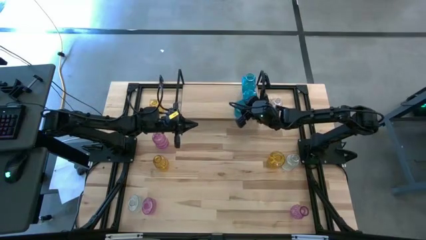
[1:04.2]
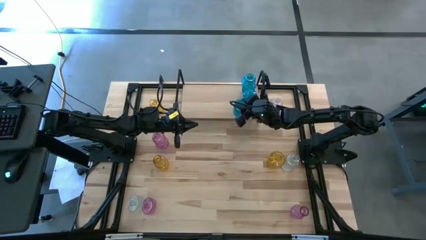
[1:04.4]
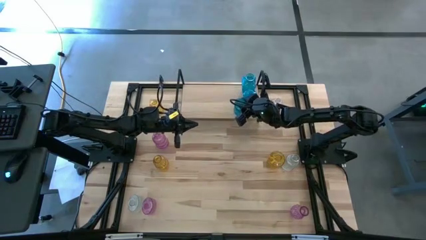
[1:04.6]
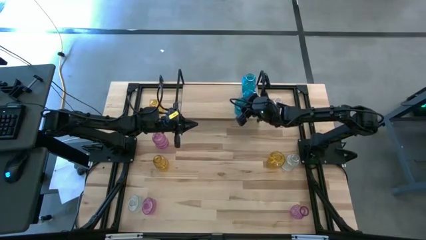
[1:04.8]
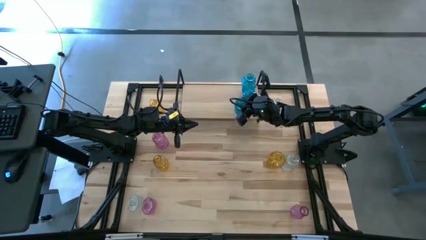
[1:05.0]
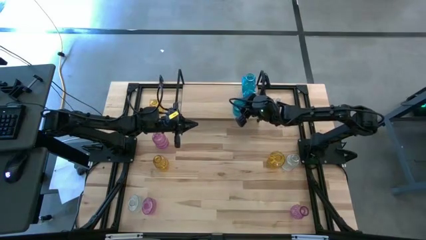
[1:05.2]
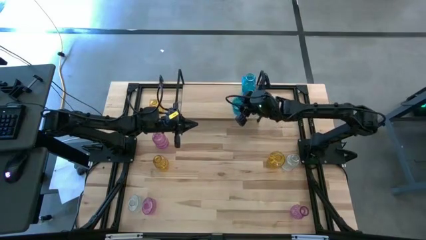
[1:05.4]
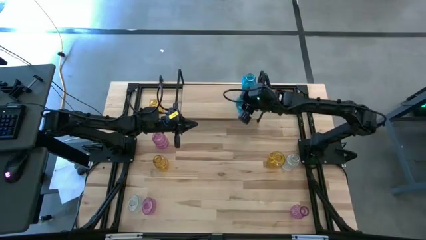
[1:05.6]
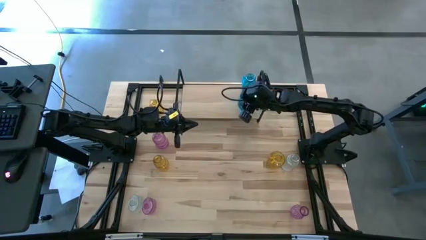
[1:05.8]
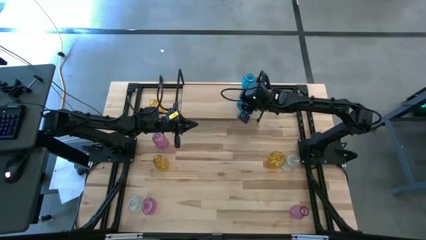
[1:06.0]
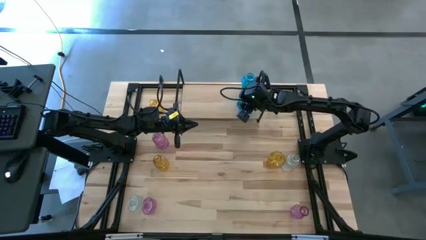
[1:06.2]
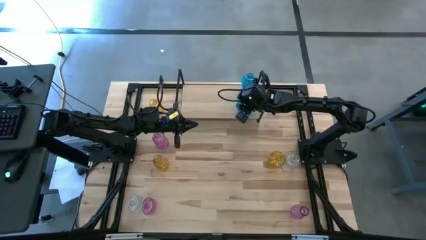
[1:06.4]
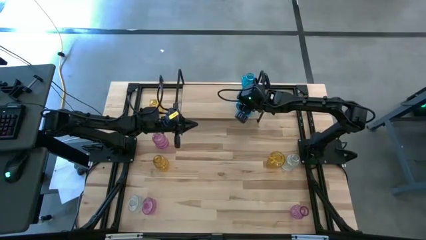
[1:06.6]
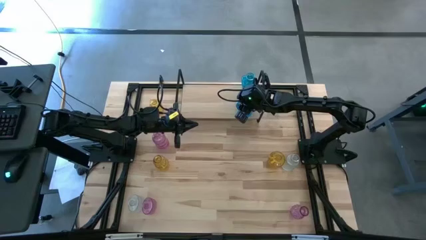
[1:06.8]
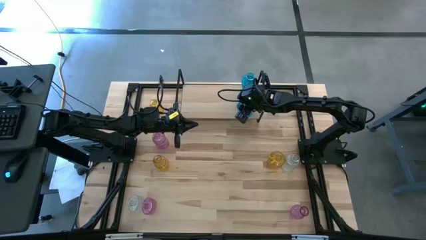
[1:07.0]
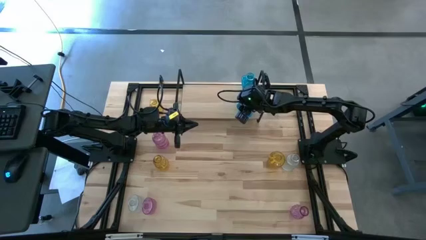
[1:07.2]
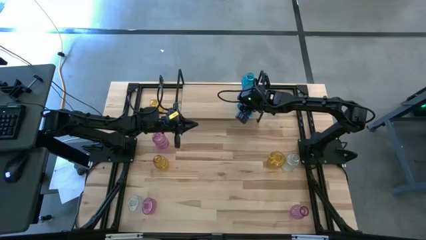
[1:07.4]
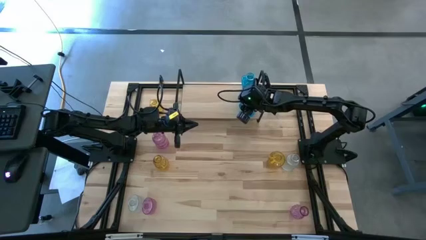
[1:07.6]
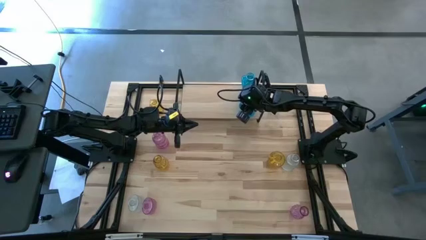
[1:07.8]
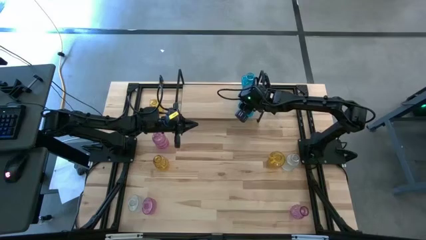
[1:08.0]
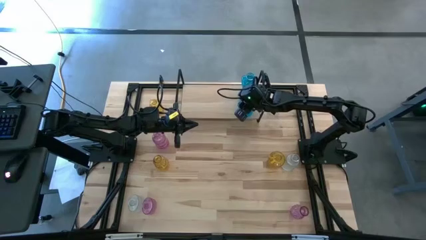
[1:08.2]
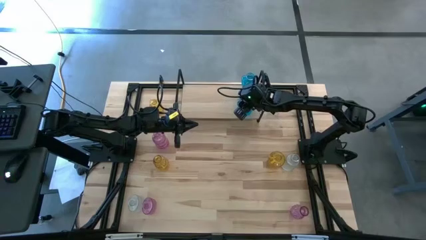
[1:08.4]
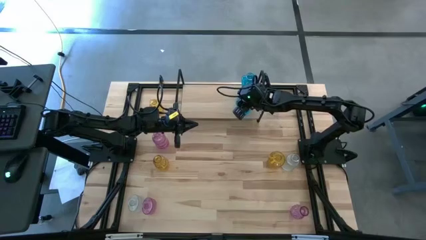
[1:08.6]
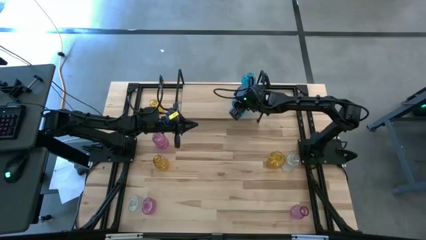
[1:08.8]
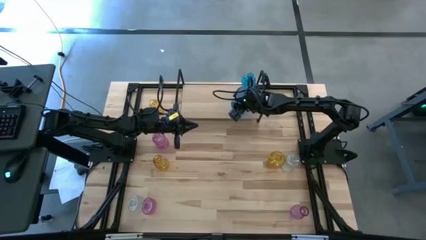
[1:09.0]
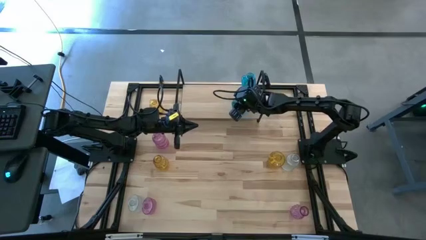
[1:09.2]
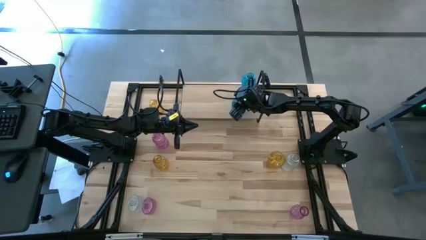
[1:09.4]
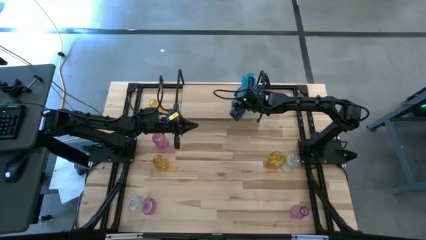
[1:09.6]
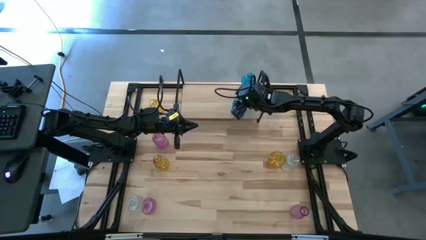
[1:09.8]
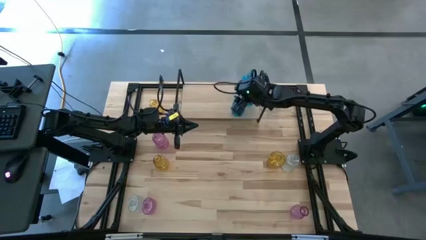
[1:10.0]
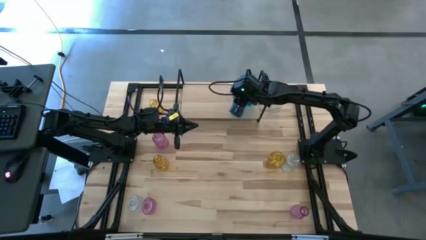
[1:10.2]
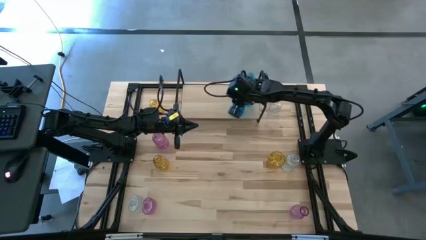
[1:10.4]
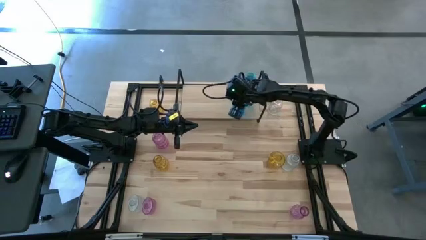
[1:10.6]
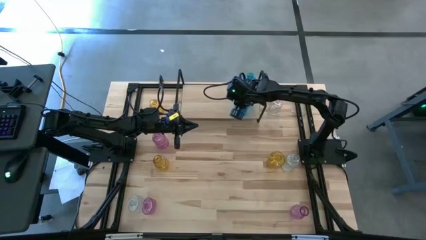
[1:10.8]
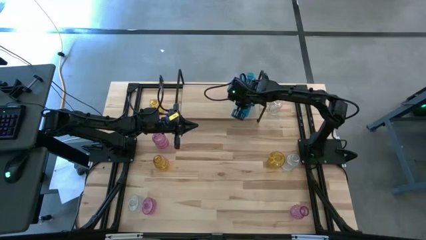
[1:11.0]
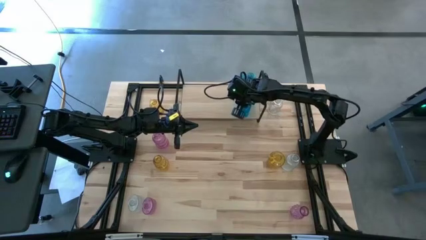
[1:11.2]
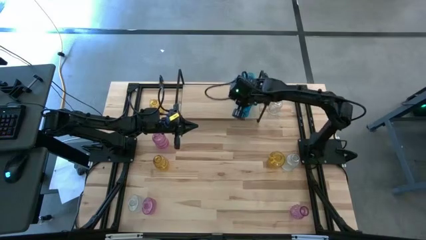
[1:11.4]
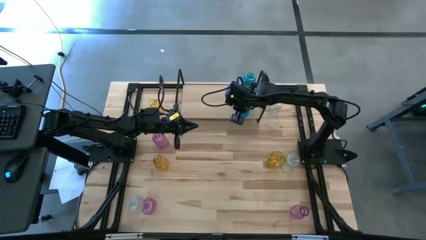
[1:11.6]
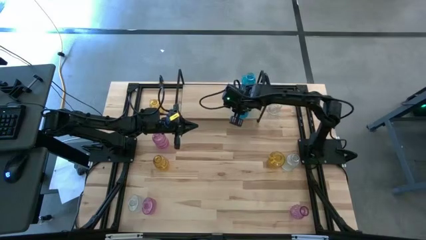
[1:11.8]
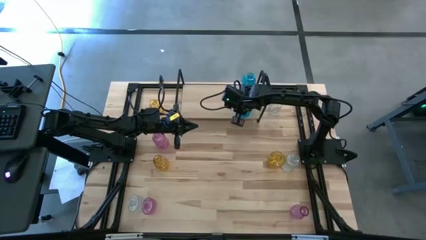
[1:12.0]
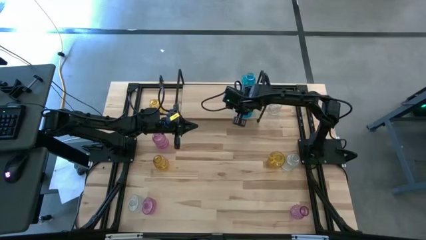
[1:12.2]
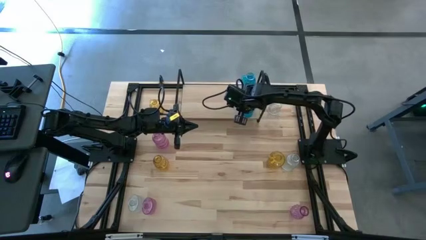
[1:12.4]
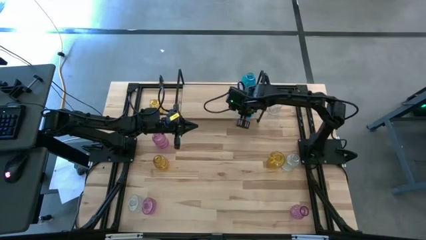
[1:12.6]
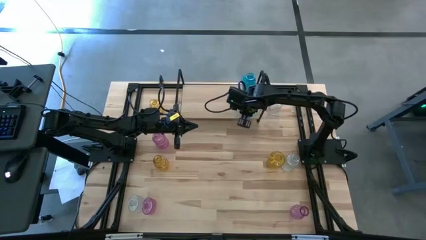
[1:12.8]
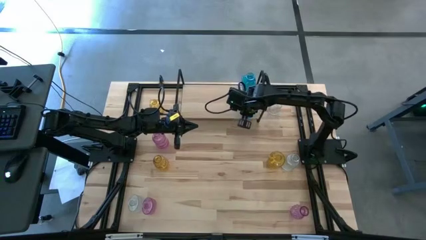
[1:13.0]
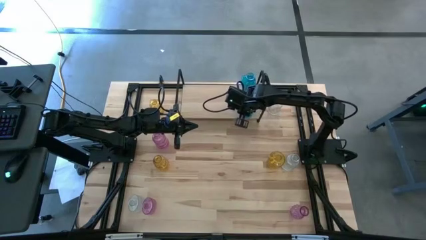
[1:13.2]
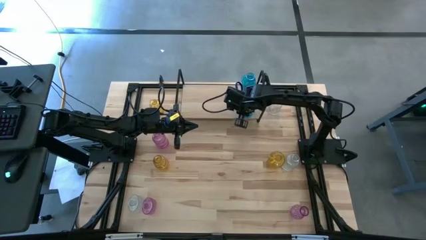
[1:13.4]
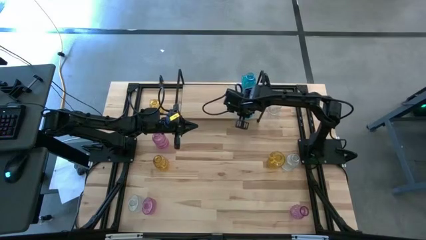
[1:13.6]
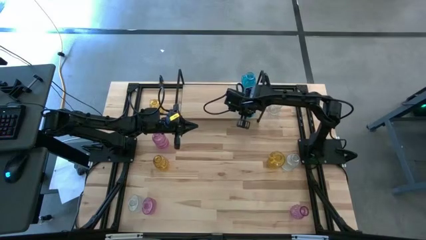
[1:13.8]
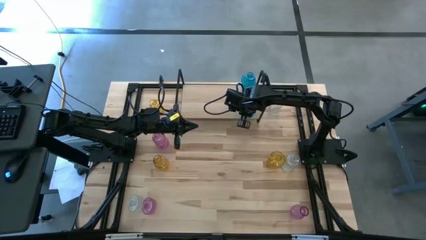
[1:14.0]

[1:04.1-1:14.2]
Task: sort vases onto shelf
Put the blue vase on the shelf aligned with the other blue vases

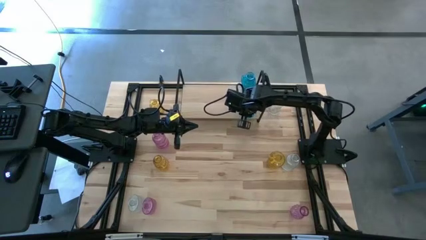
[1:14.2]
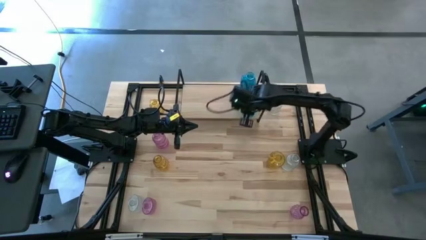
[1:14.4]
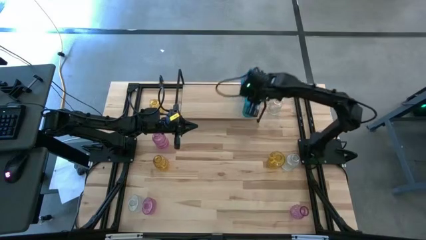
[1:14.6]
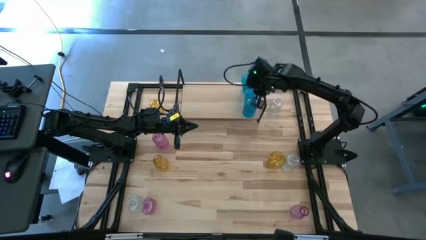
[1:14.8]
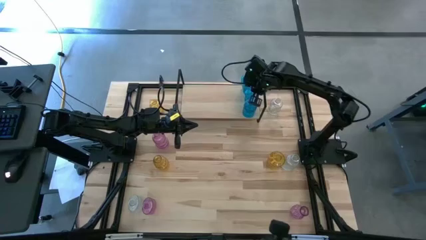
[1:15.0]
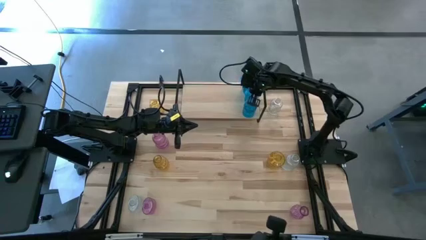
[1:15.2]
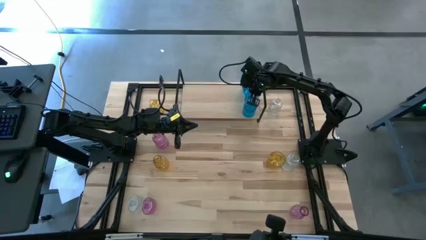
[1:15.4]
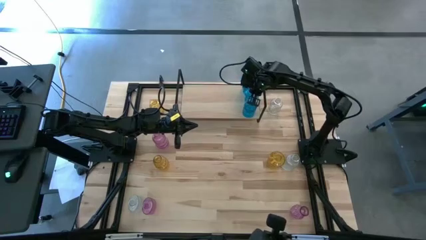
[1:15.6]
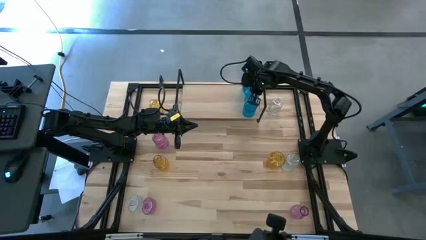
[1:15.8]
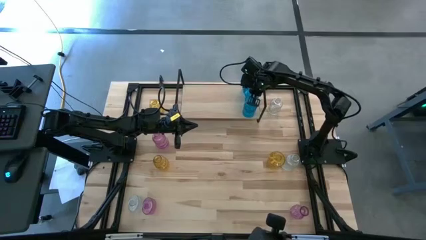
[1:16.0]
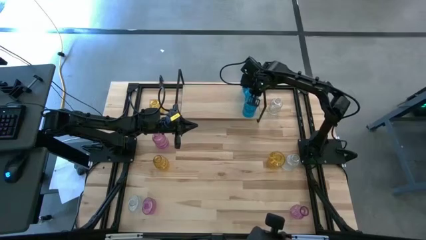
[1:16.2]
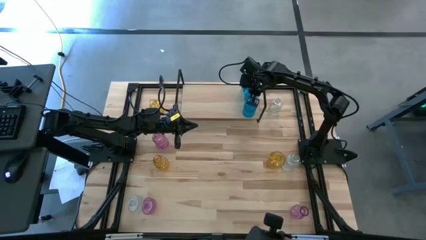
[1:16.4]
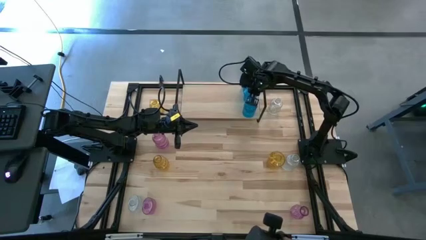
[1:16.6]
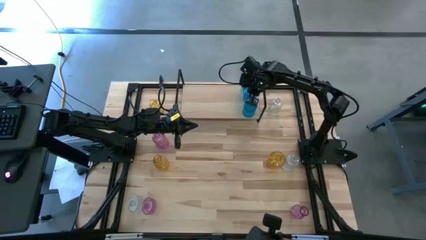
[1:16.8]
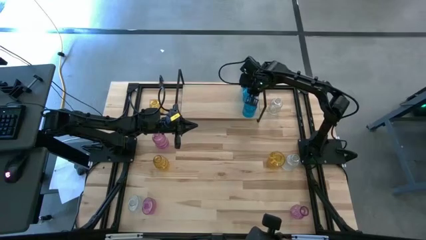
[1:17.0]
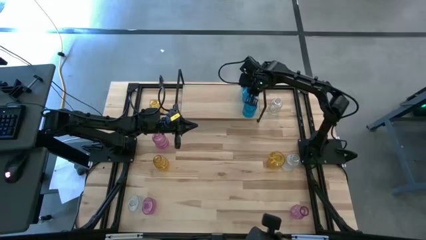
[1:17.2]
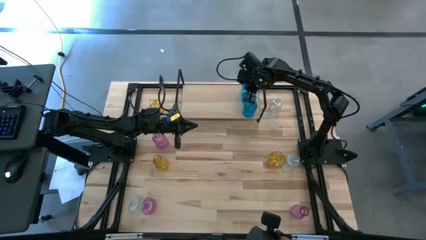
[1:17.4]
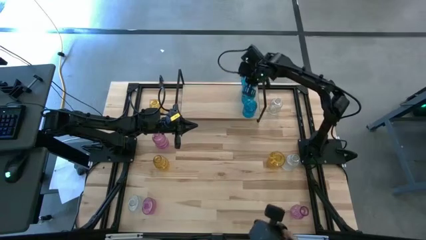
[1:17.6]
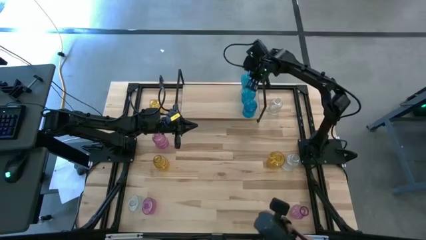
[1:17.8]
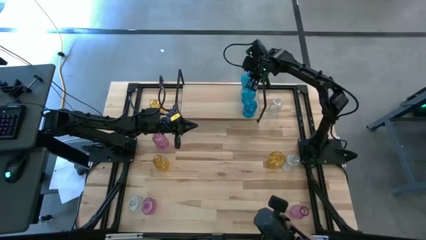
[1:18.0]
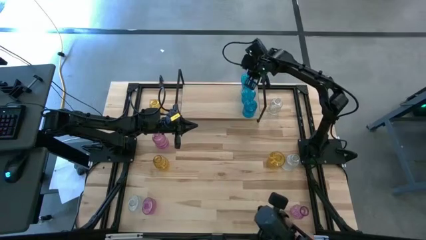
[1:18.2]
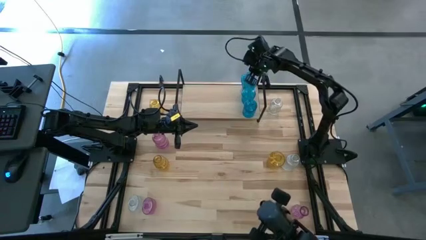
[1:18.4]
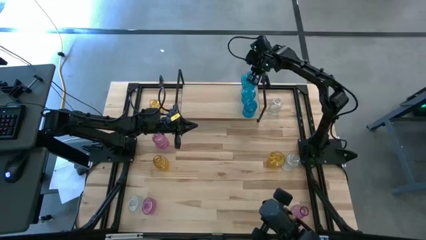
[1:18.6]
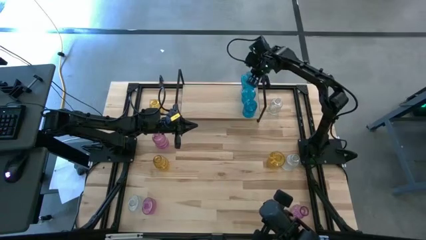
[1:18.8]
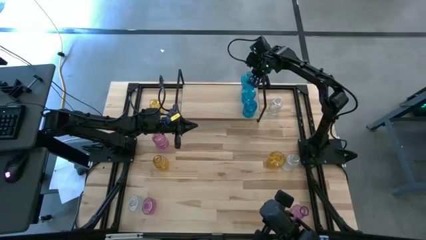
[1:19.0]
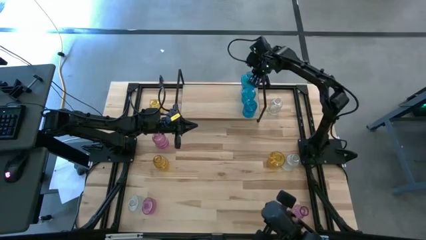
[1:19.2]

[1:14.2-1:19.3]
Adjust the blue vases on the shelf

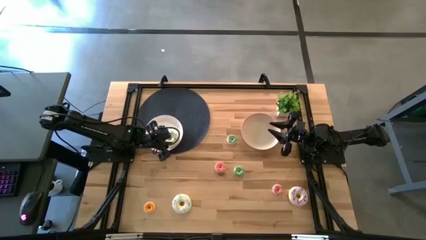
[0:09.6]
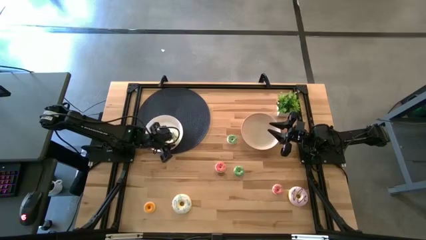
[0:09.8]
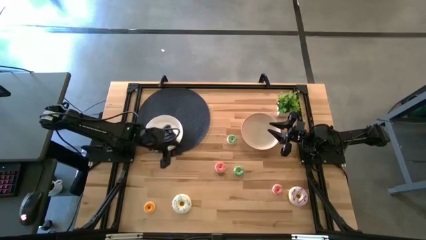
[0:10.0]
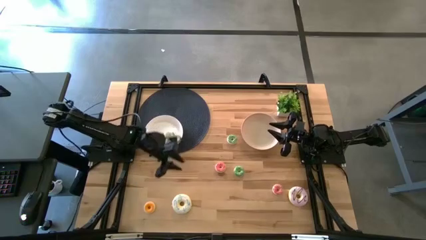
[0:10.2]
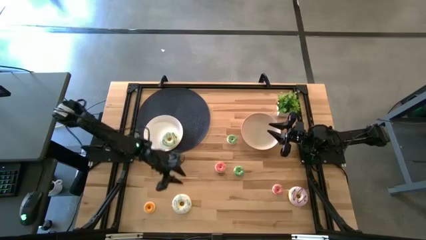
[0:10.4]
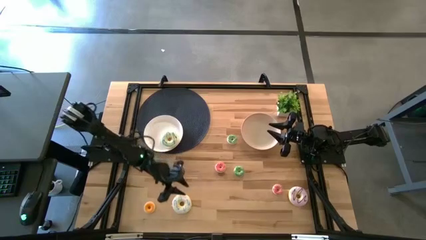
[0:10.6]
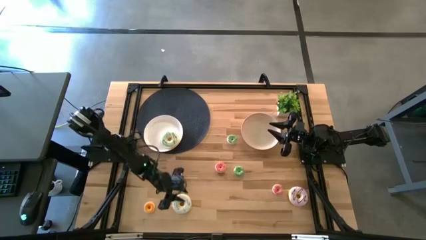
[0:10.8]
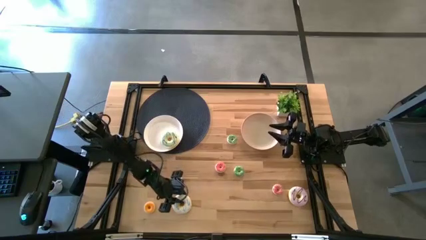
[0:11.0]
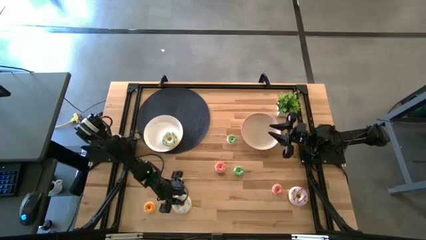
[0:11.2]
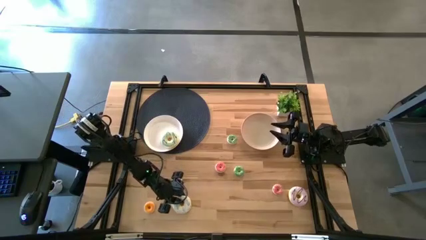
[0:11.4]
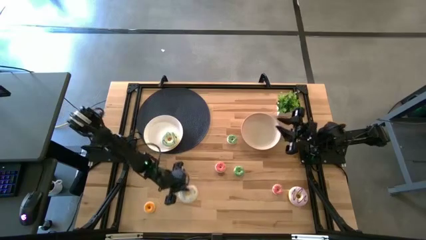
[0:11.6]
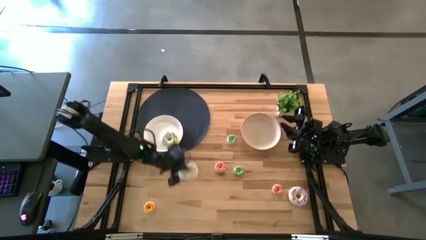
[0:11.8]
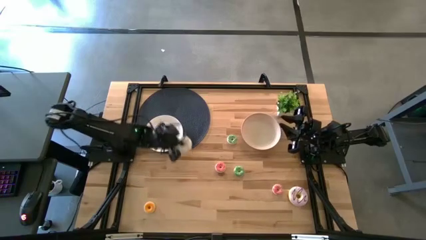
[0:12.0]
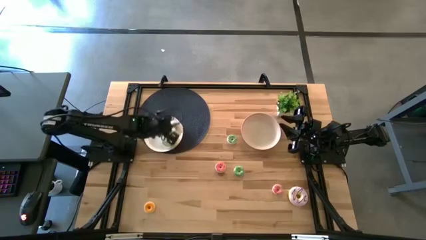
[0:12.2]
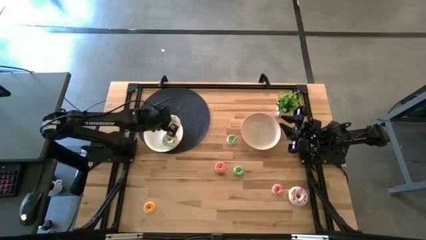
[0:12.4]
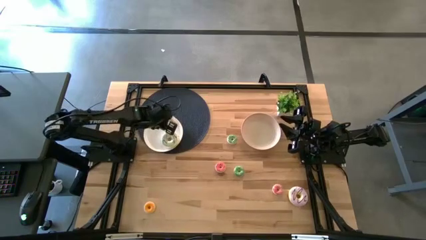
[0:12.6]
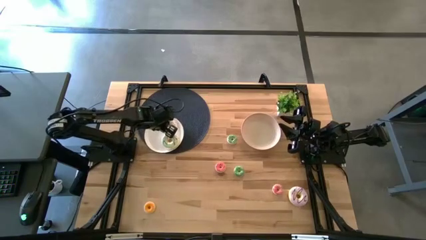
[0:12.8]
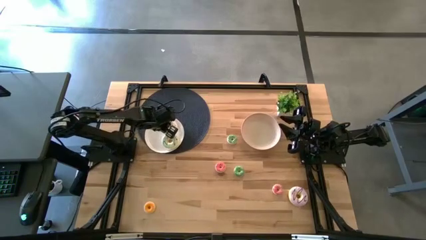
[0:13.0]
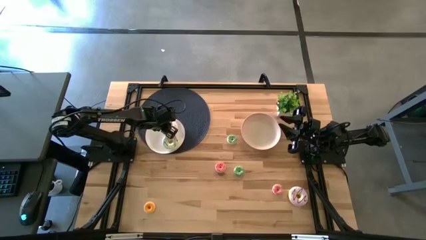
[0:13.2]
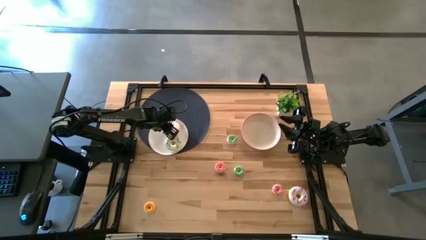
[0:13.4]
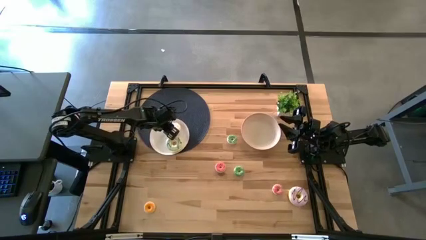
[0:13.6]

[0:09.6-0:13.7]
Task: Pick & Place donuts
Put the large white donut on the left white plate
